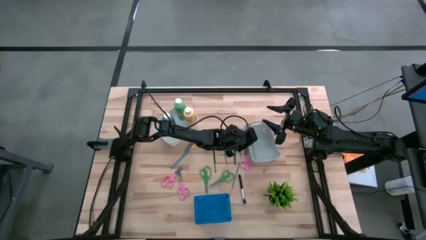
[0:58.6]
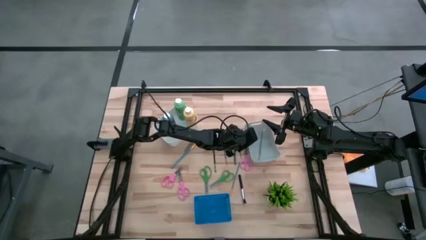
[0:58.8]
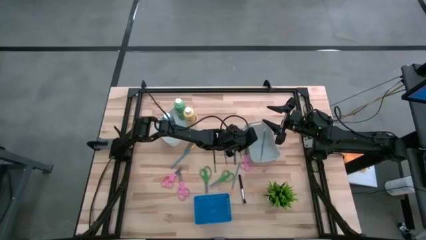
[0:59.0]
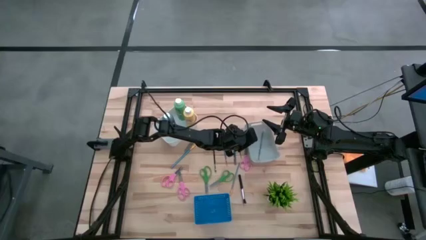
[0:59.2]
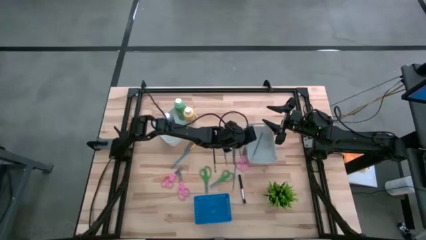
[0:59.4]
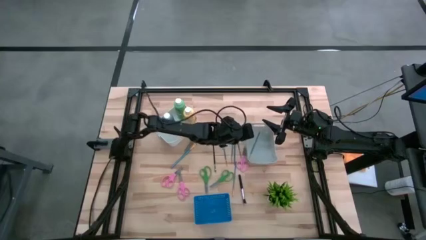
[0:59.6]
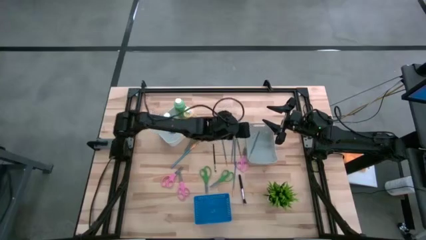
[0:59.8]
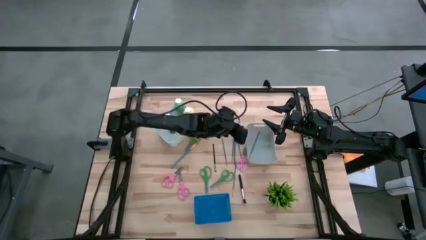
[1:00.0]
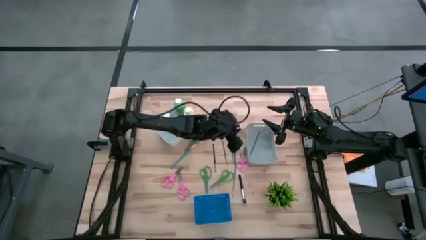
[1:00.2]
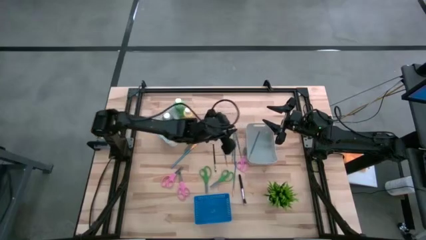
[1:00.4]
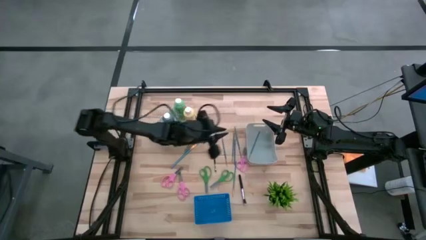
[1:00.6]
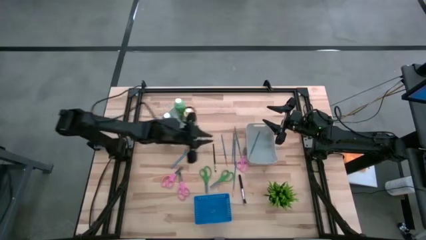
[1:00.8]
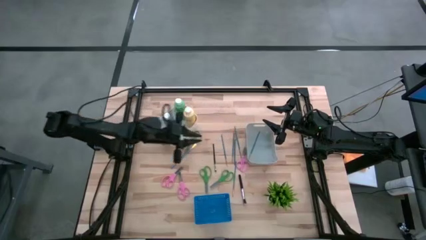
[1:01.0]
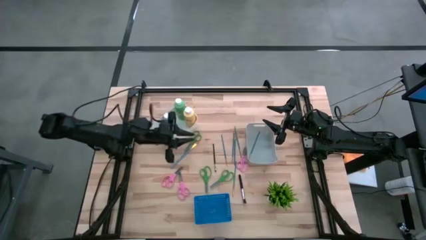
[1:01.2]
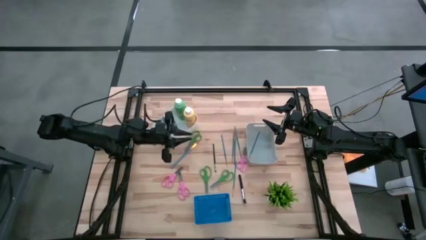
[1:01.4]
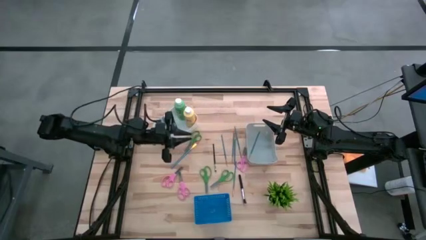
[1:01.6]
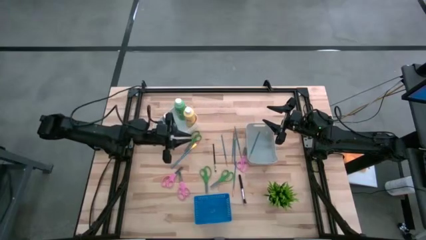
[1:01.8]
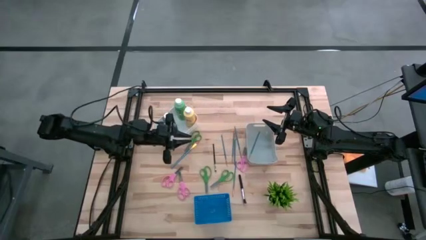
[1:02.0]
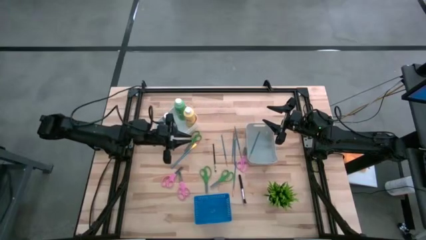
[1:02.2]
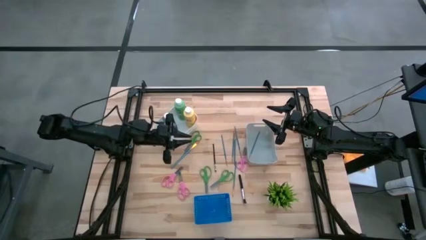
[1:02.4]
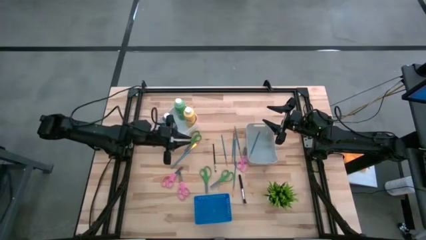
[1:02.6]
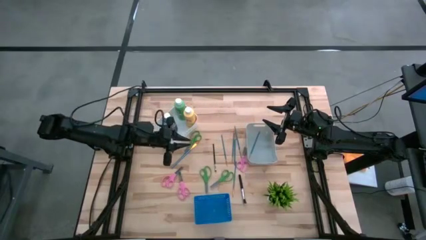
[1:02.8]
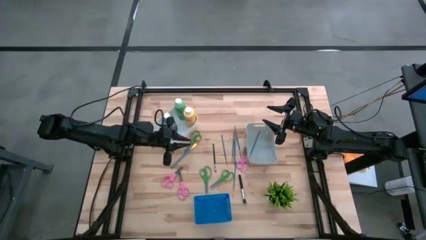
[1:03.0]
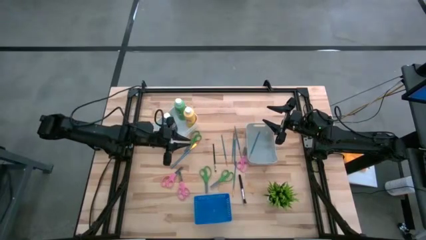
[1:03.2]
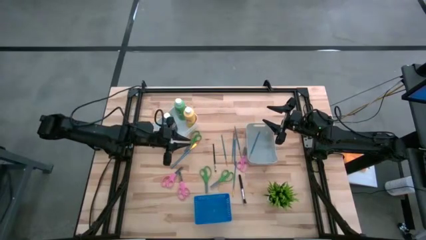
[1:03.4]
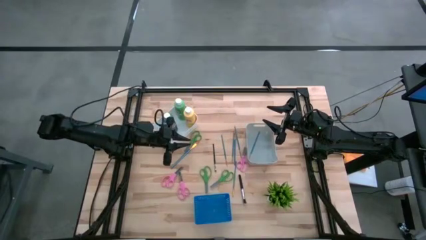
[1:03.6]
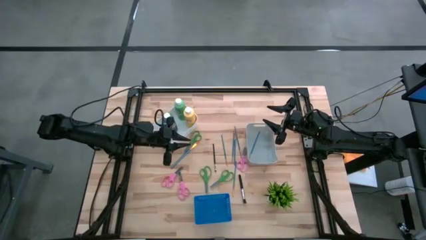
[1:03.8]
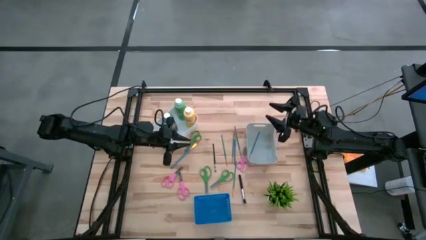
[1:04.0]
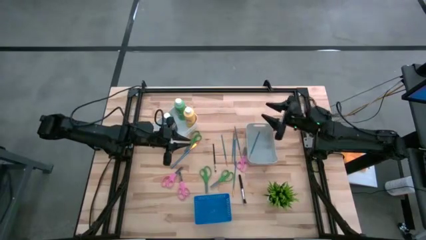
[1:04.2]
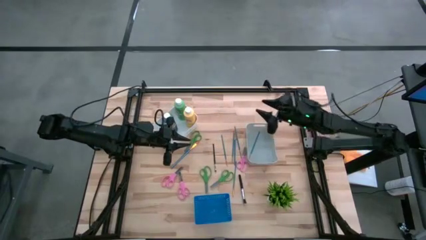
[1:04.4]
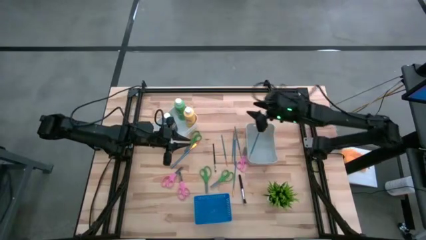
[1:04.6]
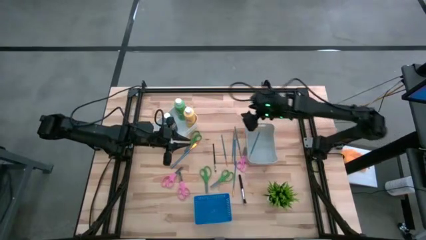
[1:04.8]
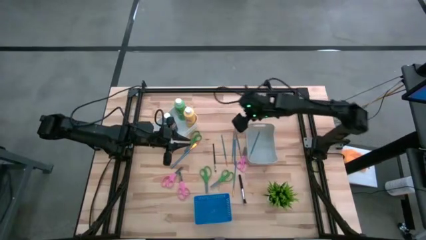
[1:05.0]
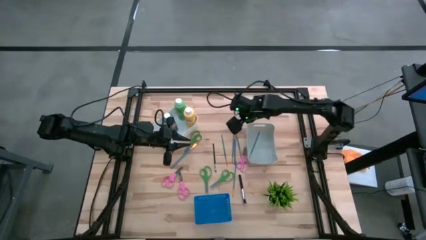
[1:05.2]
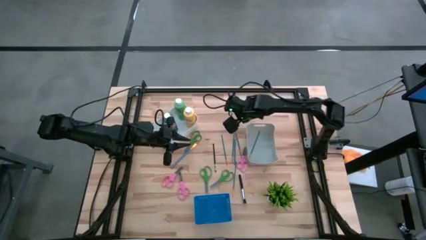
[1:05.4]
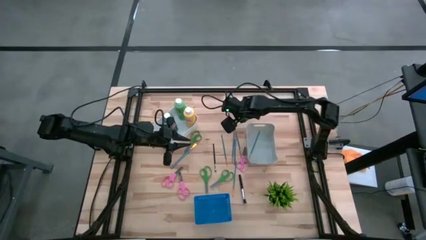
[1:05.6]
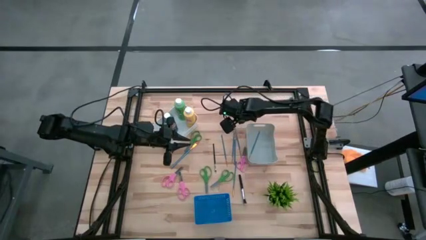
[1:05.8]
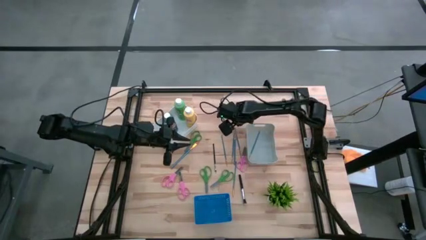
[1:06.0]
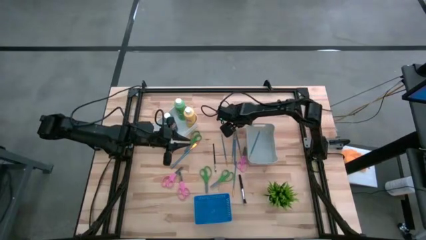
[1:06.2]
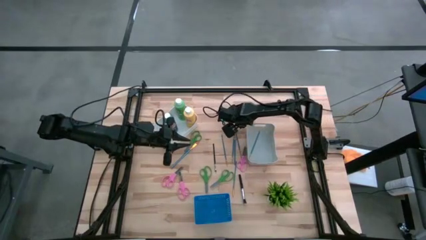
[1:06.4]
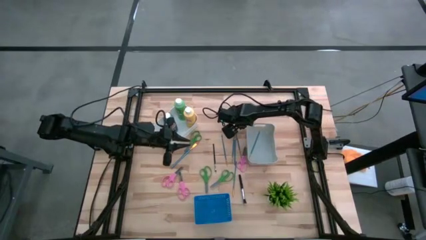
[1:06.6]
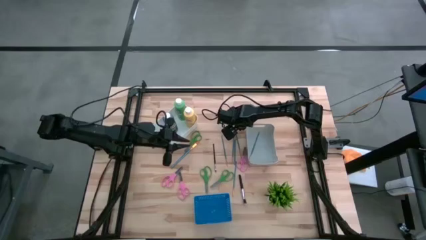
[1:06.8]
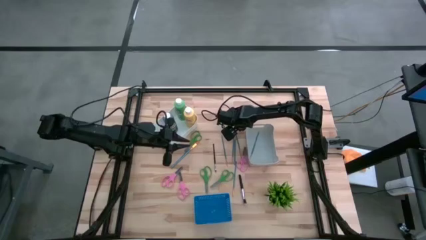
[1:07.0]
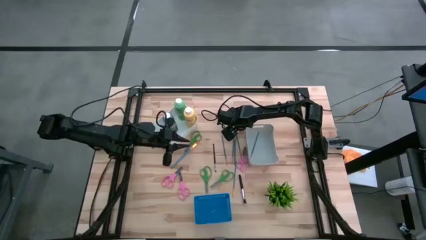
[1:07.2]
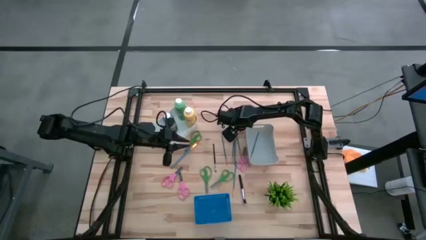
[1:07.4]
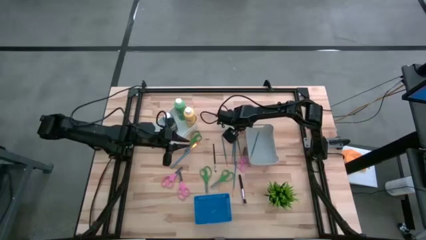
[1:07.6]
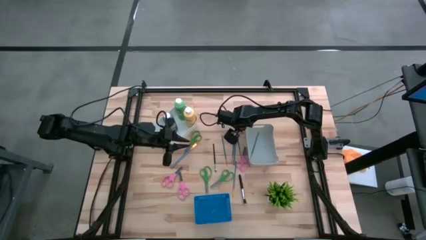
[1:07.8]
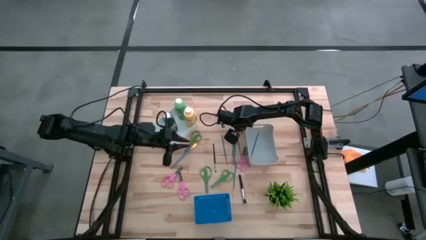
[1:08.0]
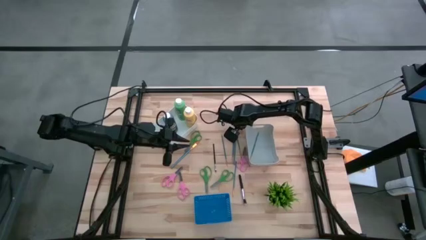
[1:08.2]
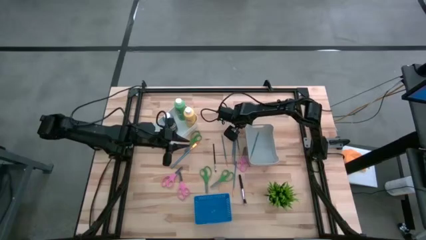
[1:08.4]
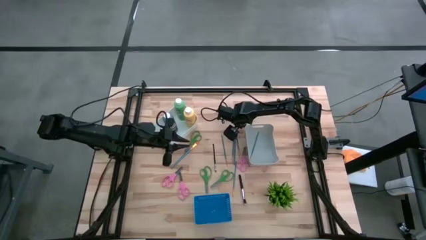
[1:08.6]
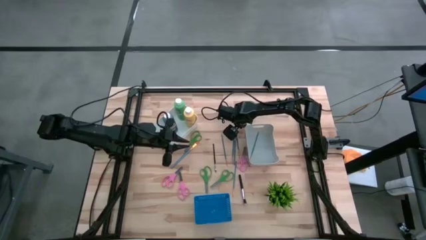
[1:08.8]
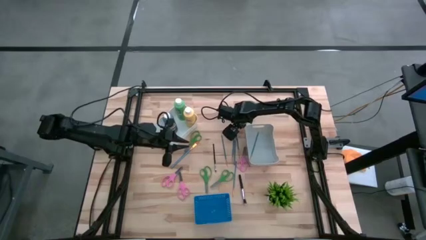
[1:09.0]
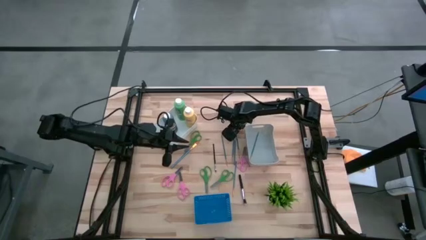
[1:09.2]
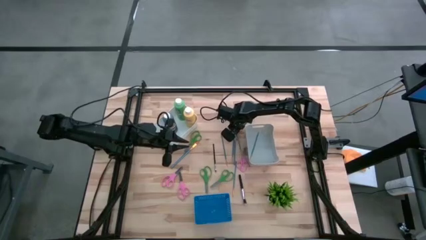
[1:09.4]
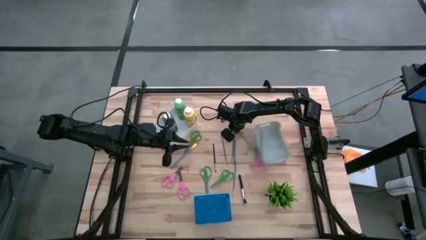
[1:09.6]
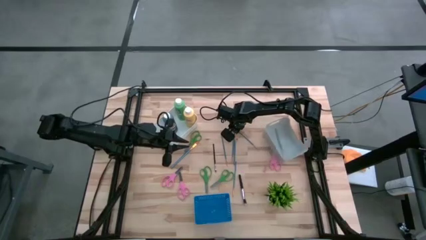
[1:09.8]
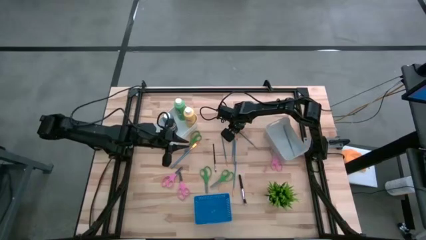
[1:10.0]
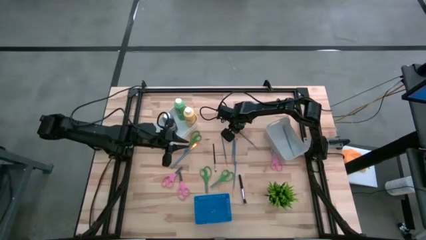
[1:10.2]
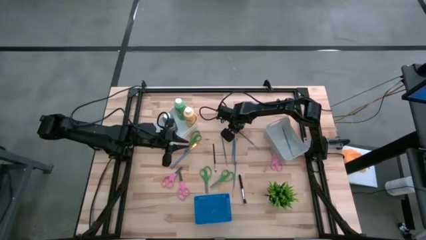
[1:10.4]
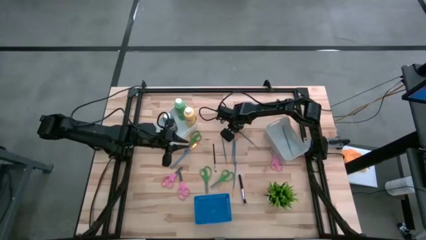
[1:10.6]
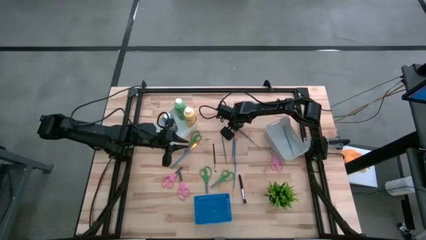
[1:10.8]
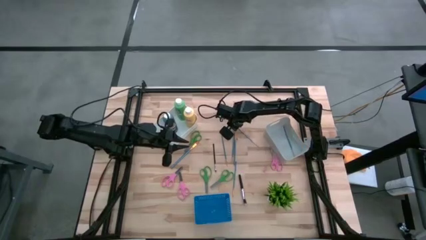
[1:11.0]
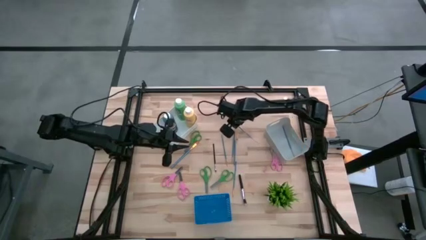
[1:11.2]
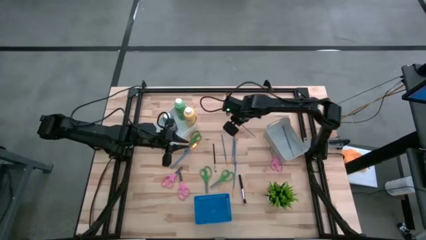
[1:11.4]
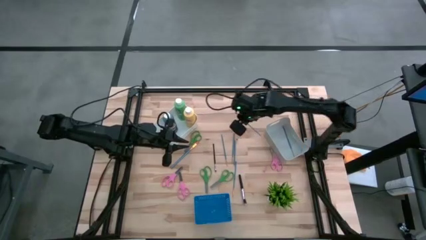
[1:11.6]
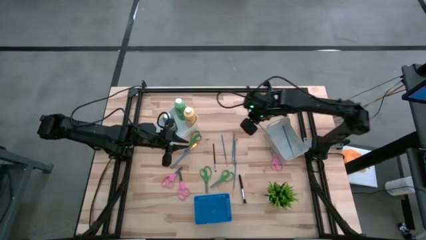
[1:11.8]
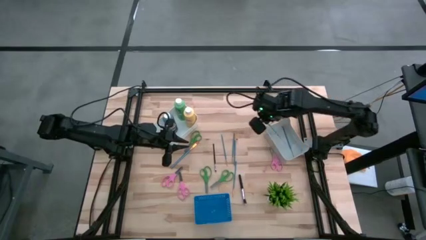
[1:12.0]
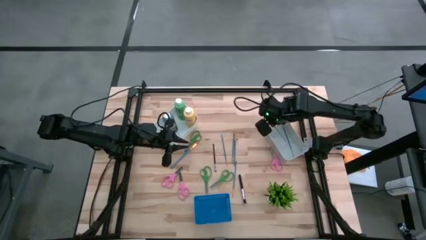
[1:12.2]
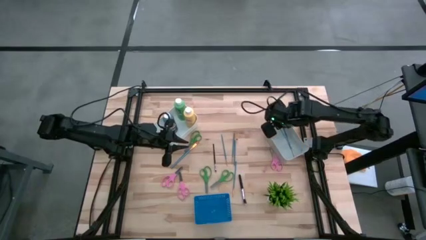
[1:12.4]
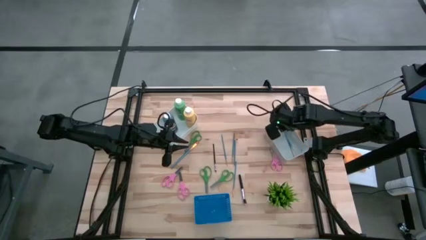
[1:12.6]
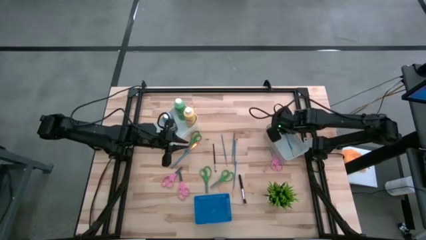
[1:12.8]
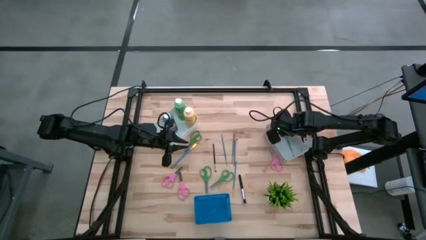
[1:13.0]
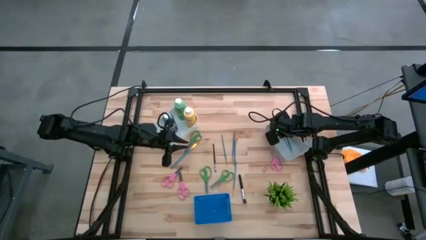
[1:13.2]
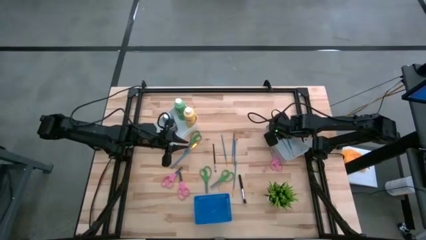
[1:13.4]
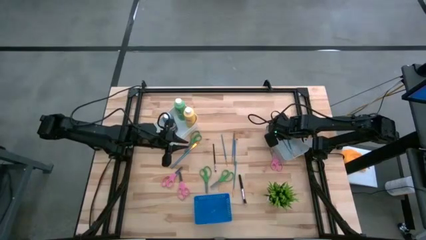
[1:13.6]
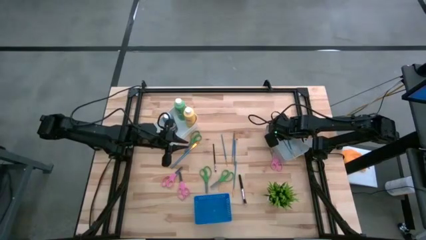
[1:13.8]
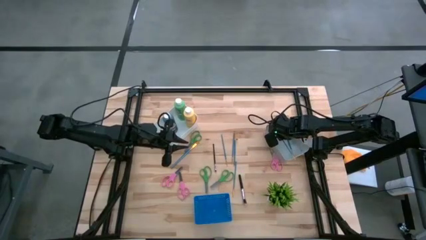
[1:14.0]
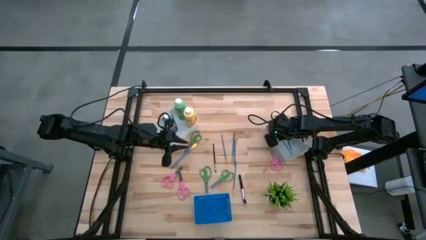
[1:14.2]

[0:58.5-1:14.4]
Task: Pick & Place Paint Supplies
Put the blue paintbrush into the gray bin

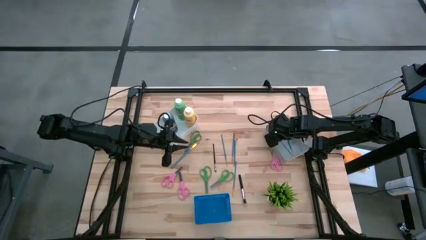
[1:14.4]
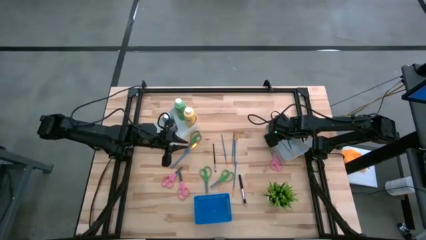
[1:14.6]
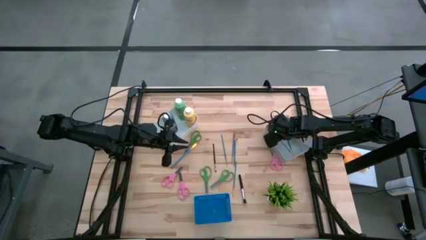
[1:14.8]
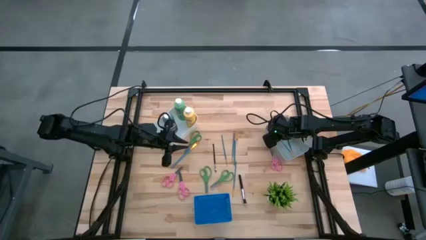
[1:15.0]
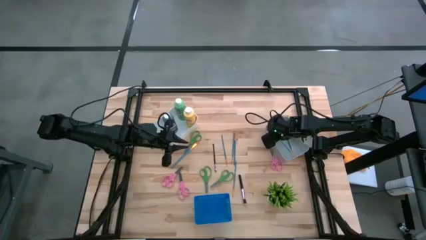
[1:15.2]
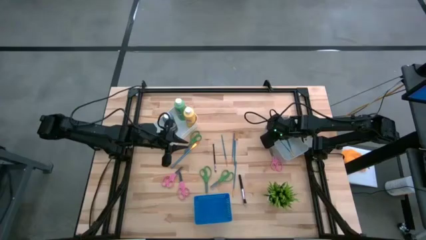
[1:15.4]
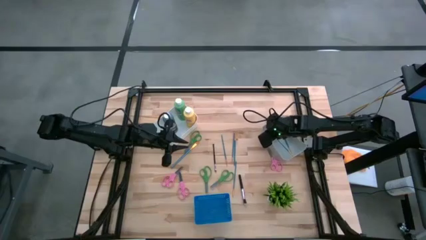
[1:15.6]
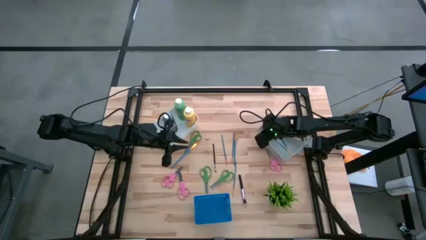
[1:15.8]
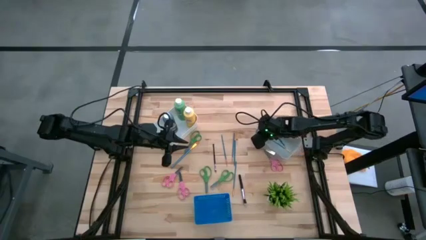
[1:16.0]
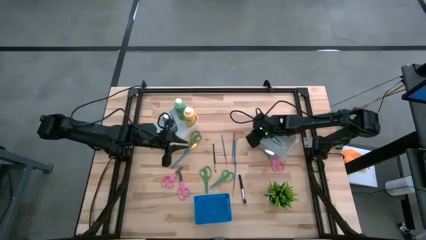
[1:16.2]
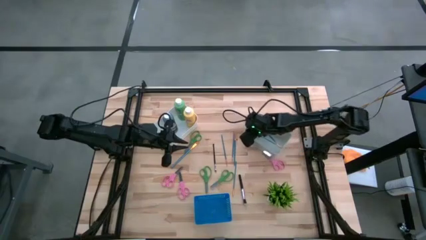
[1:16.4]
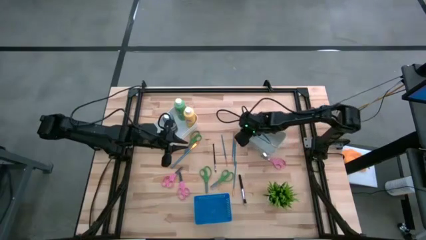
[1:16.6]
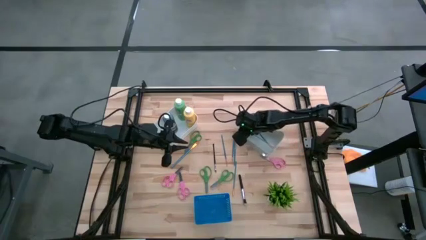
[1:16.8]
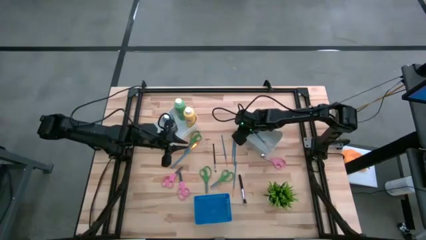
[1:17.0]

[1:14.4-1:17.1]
Adjust the gray bin
